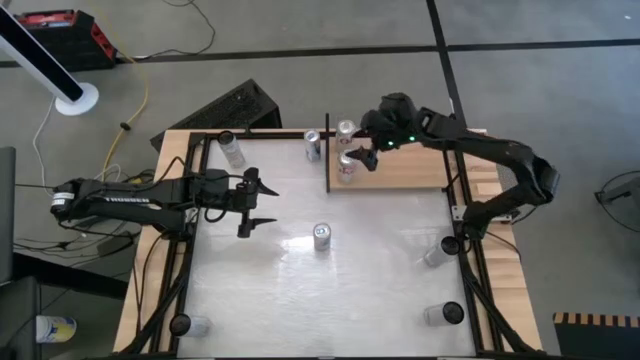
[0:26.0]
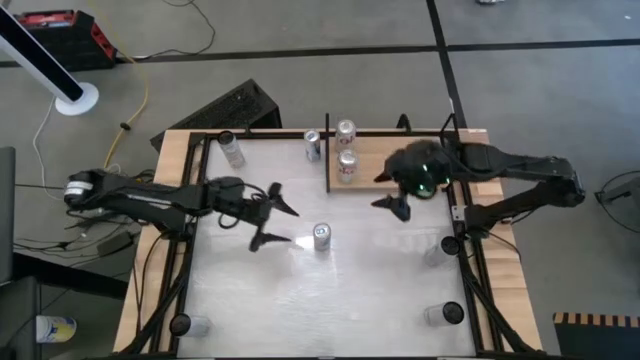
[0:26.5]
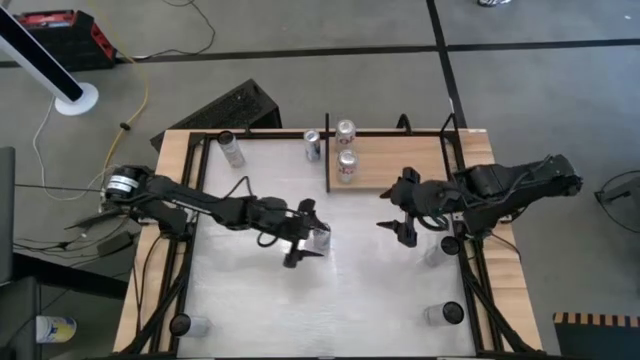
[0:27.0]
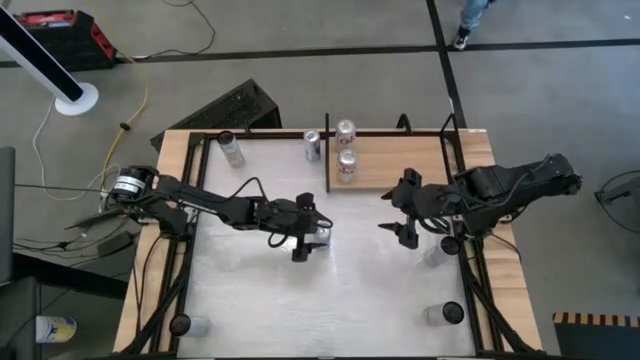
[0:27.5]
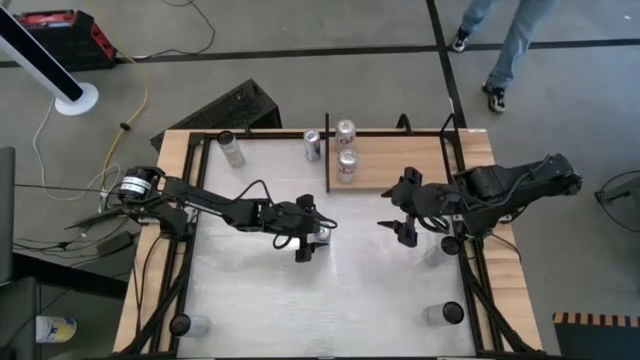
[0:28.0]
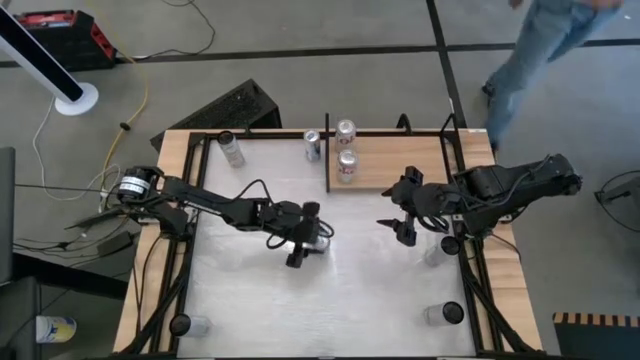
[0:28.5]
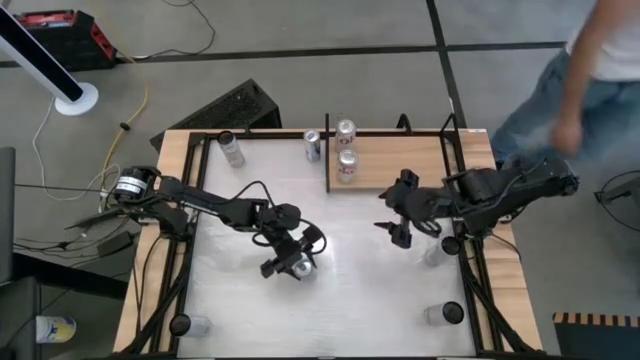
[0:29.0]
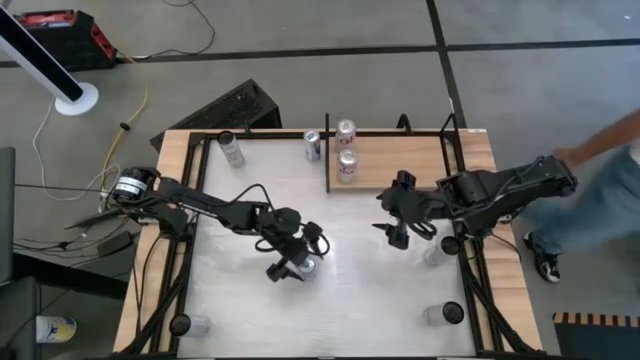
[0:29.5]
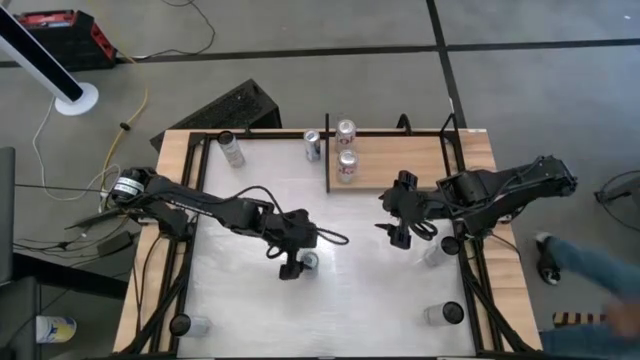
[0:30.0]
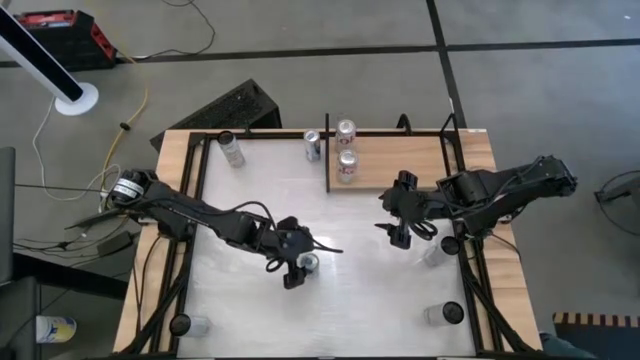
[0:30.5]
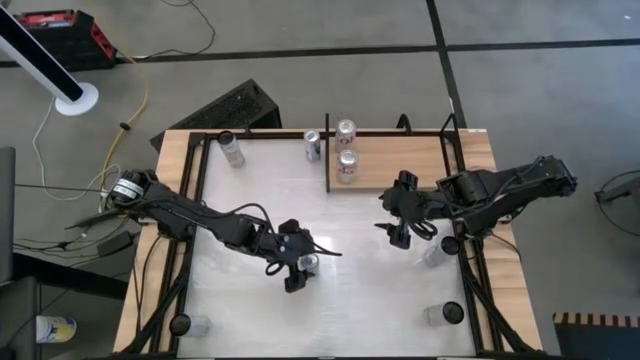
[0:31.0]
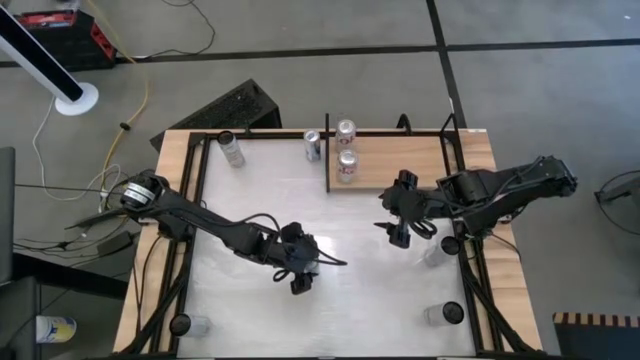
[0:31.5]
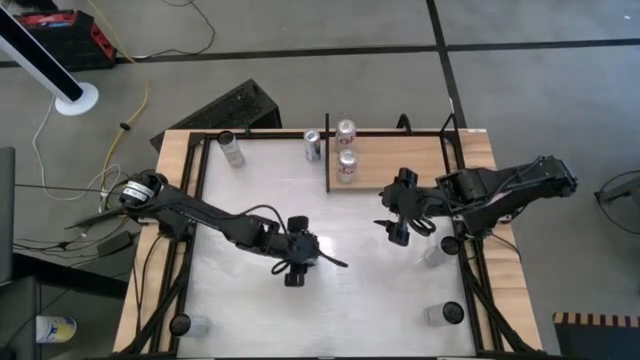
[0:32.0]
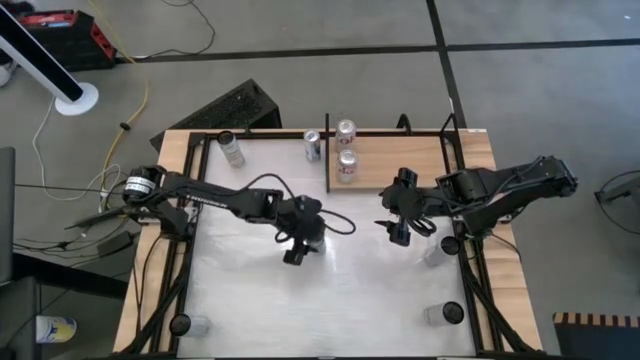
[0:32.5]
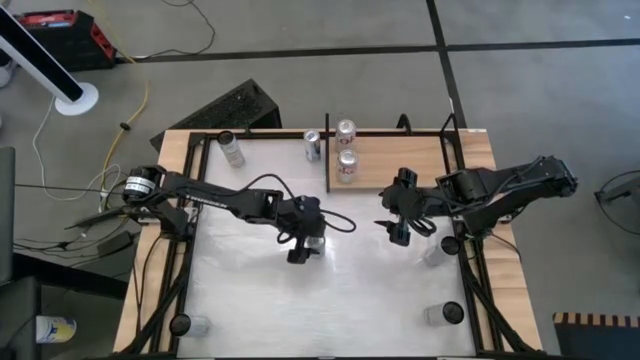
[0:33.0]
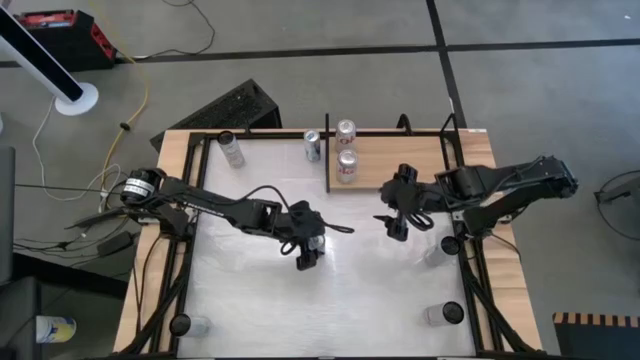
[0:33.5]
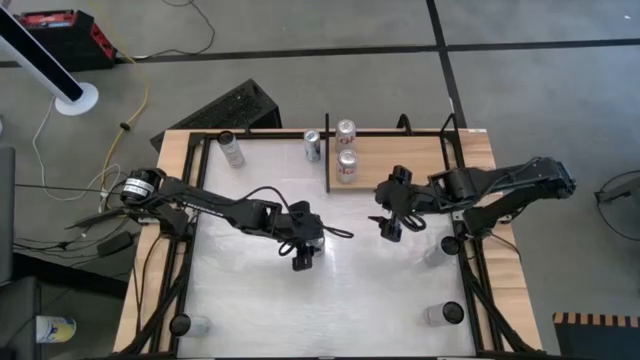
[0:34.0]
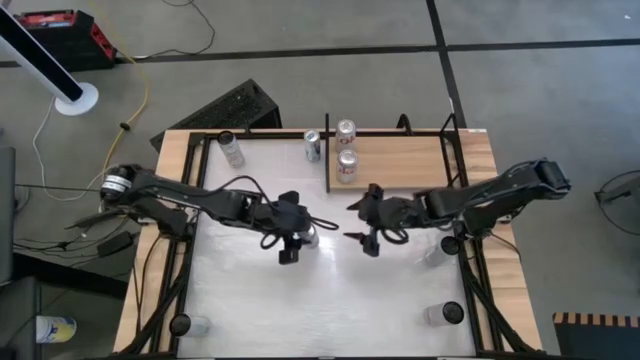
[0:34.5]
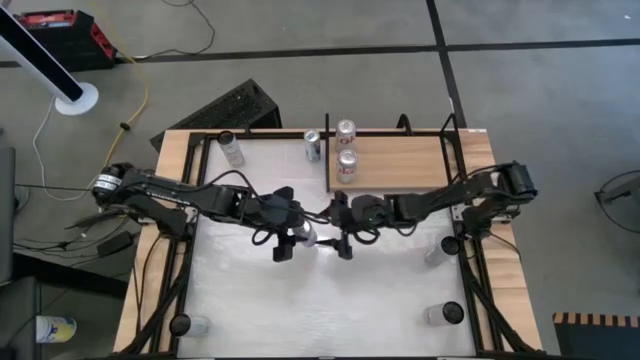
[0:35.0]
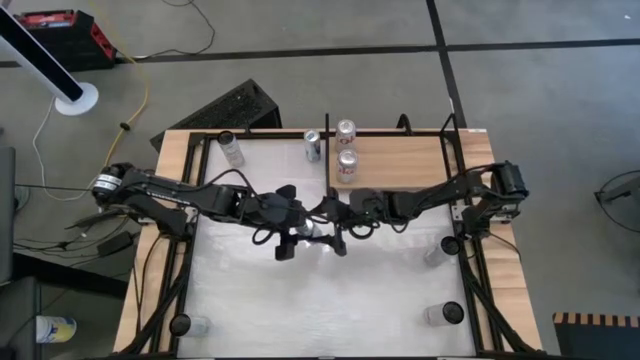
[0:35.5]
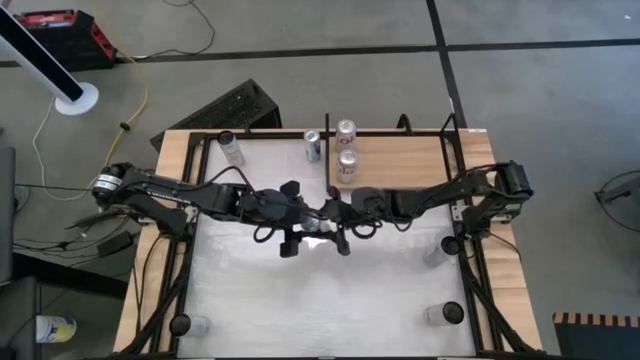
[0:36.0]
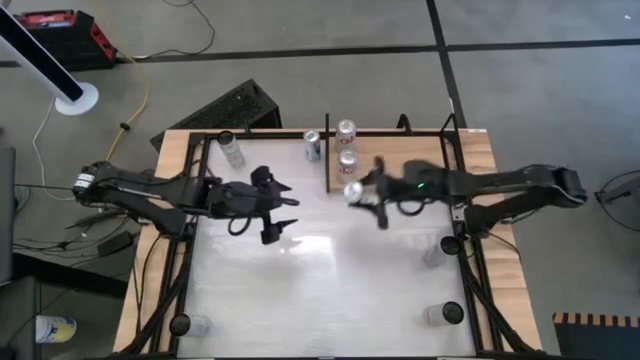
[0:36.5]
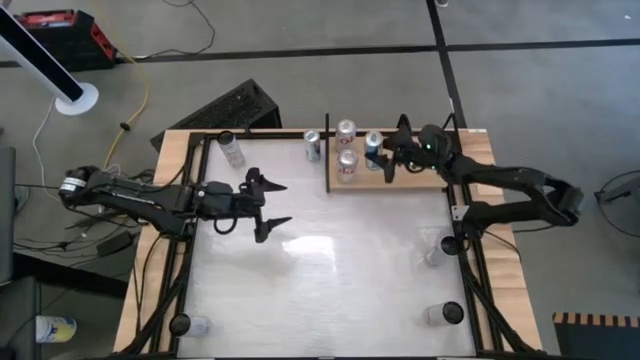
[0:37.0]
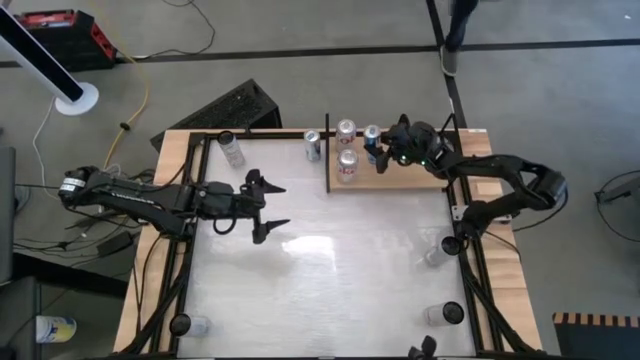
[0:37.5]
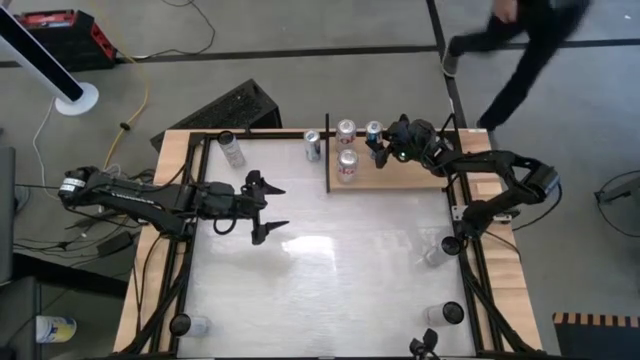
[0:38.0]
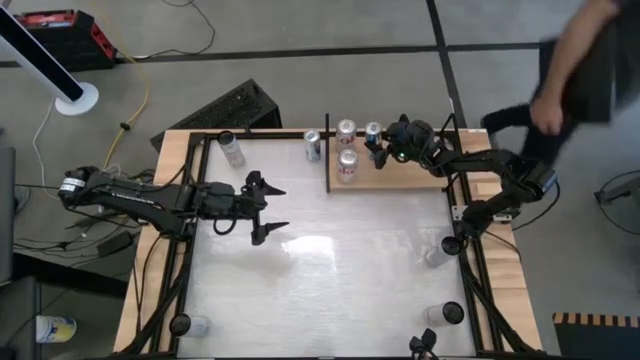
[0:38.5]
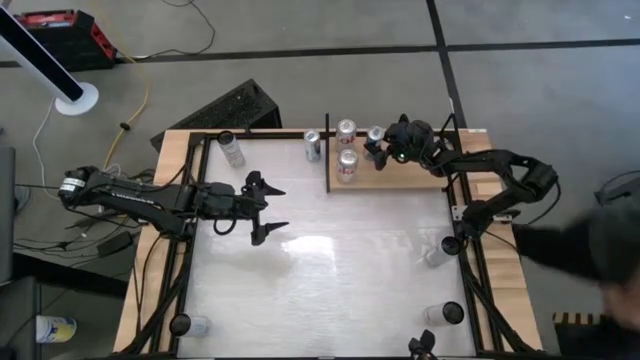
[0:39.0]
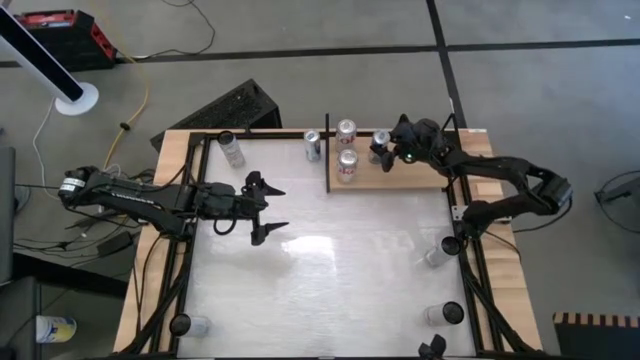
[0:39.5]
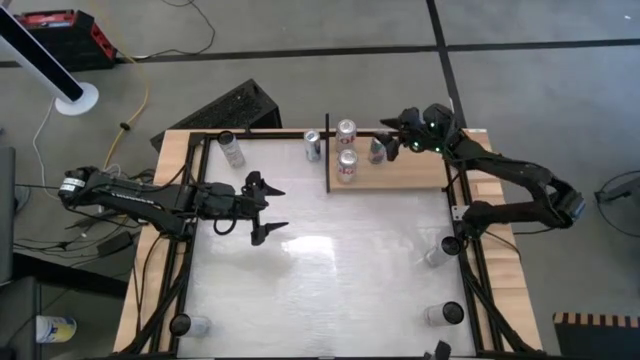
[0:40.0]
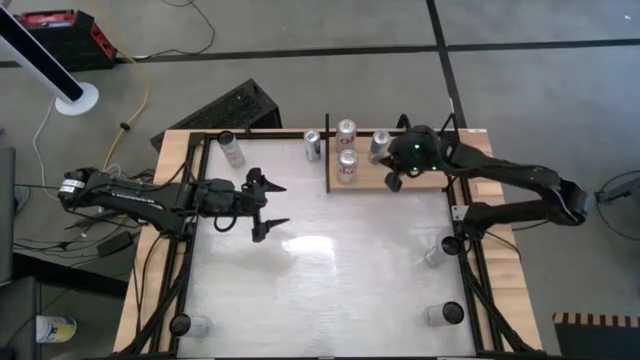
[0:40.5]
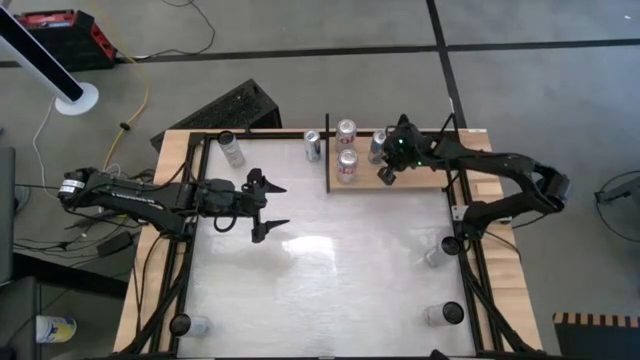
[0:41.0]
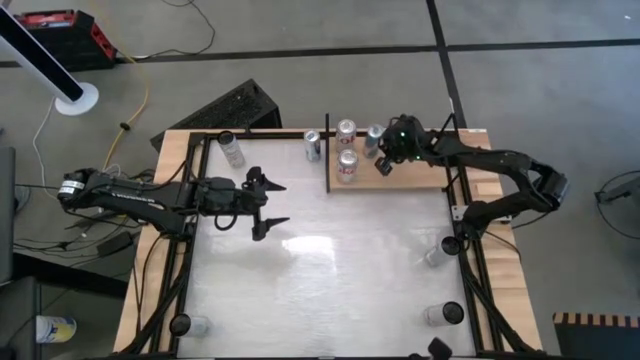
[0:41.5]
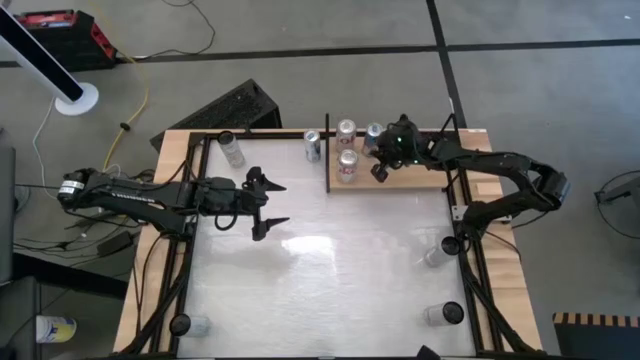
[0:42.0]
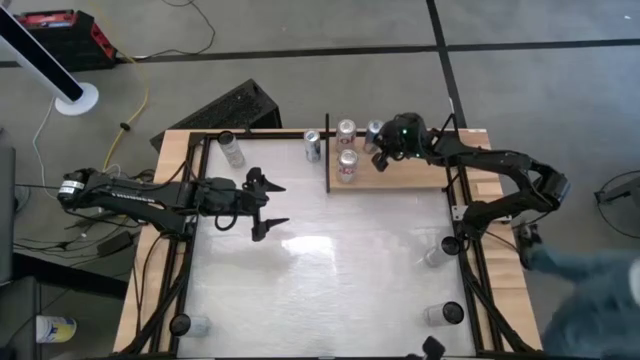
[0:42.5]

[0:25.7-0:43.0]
Task: Place canned beverage on shelf
Put the bottom blue soda can on the shelf
